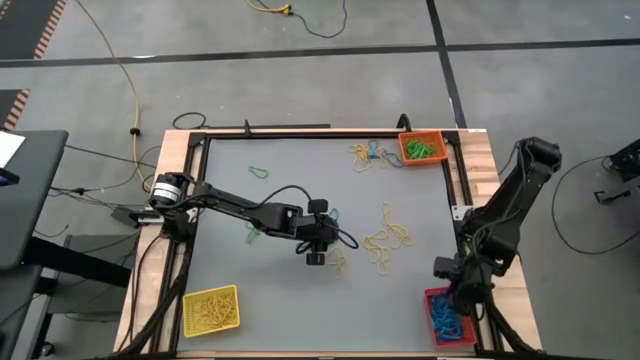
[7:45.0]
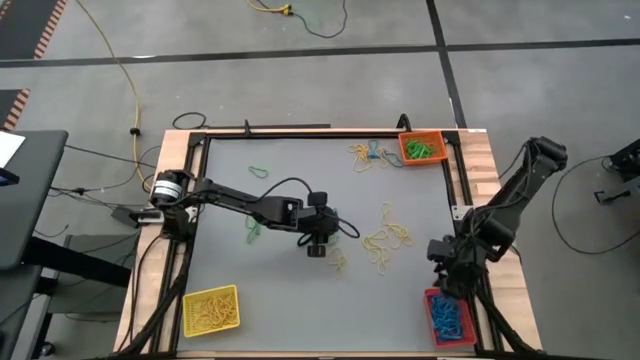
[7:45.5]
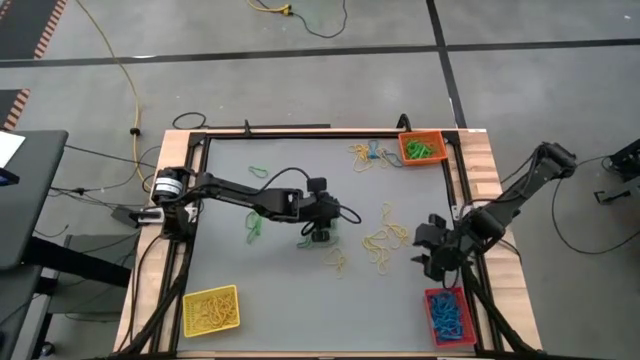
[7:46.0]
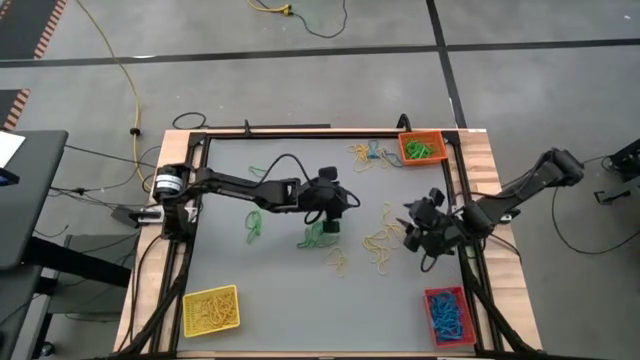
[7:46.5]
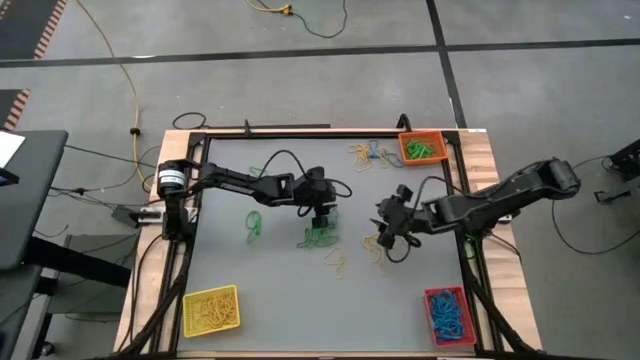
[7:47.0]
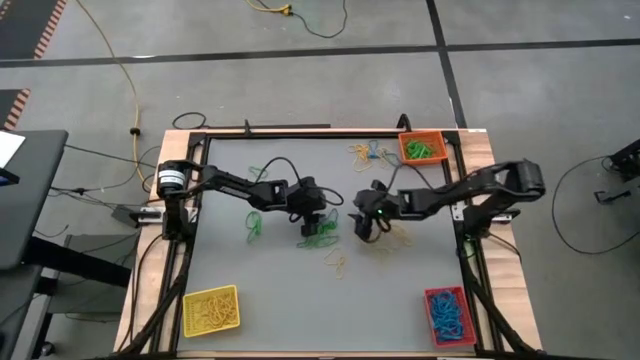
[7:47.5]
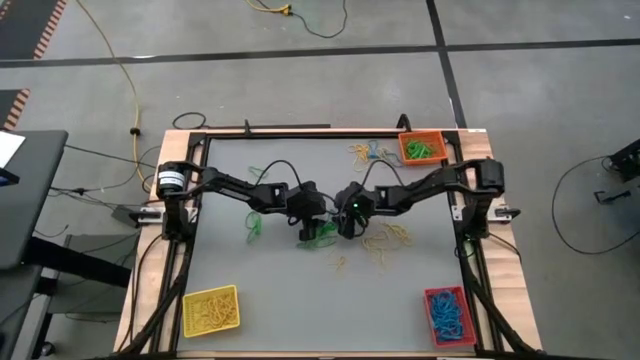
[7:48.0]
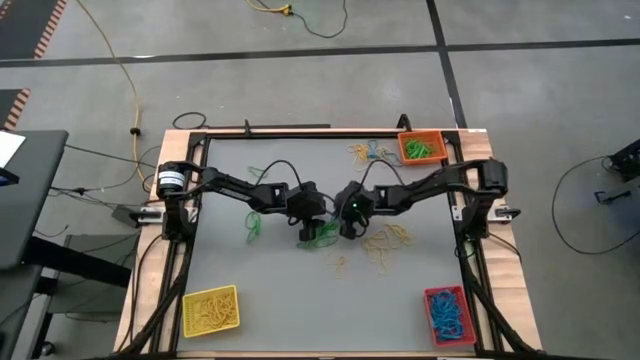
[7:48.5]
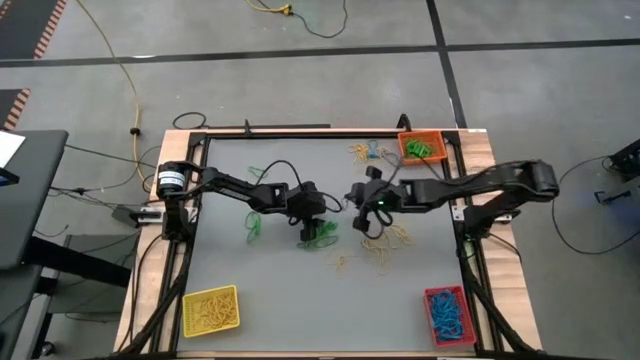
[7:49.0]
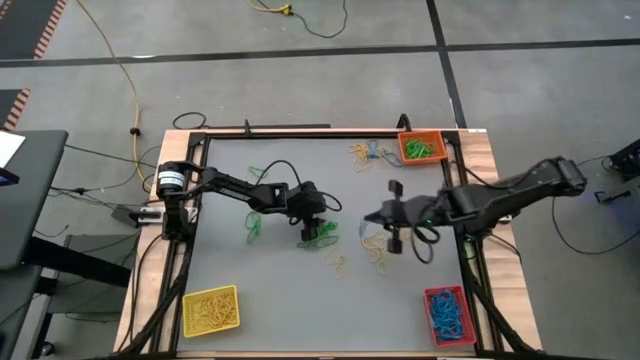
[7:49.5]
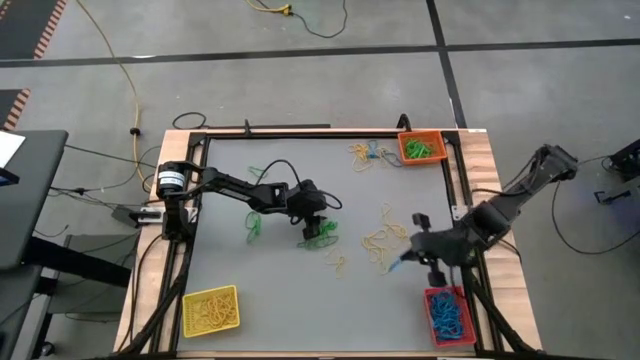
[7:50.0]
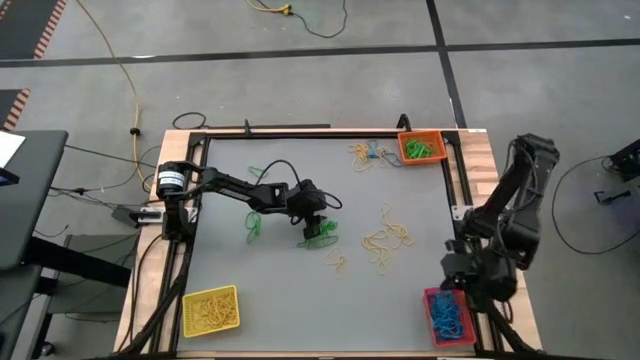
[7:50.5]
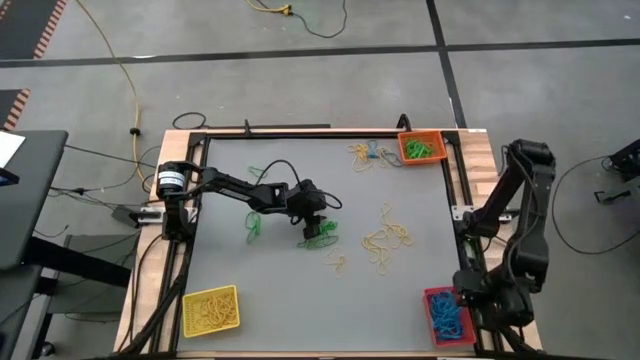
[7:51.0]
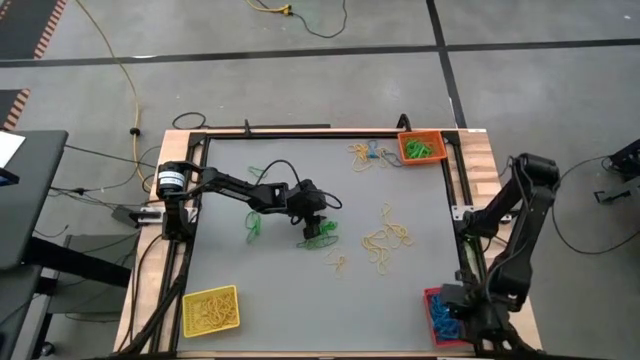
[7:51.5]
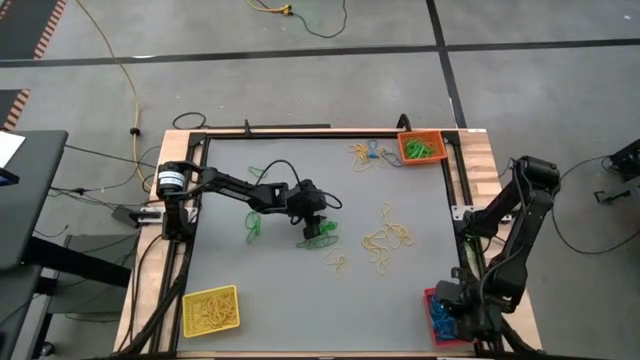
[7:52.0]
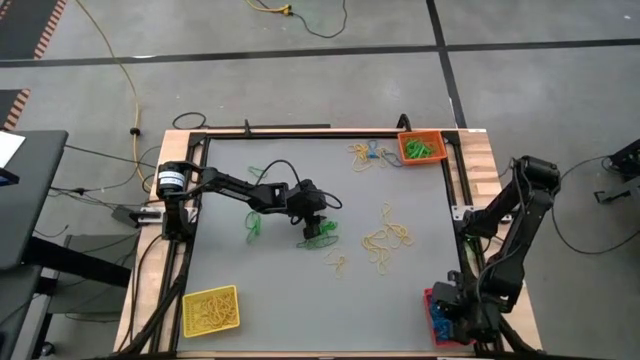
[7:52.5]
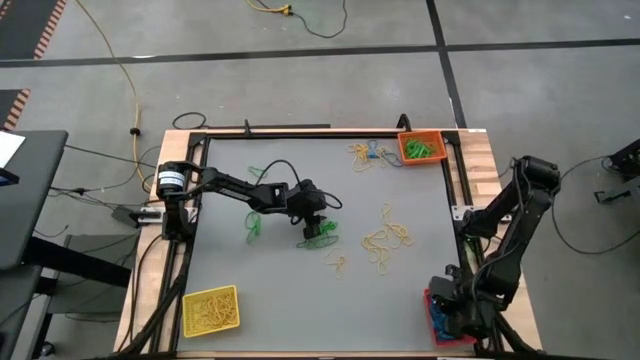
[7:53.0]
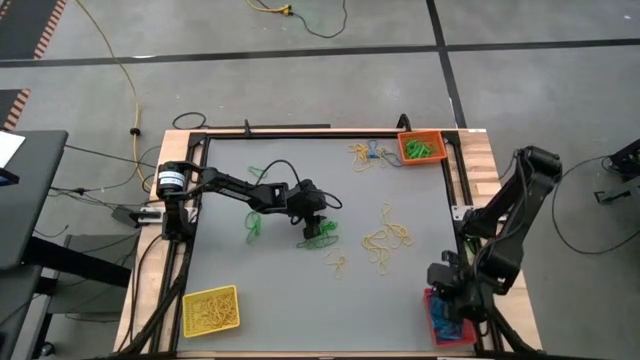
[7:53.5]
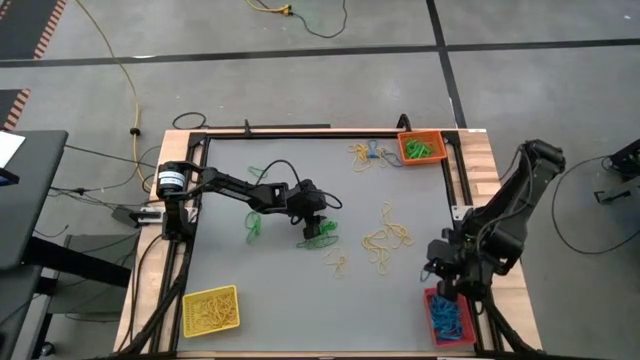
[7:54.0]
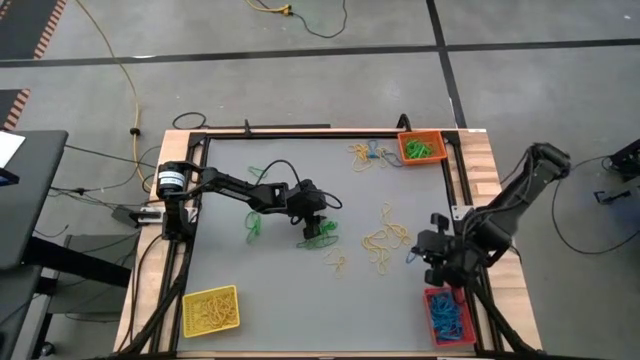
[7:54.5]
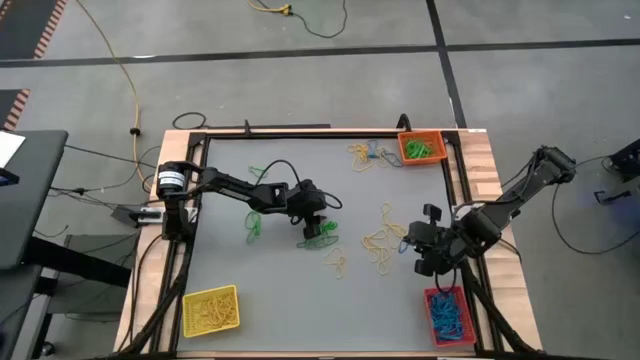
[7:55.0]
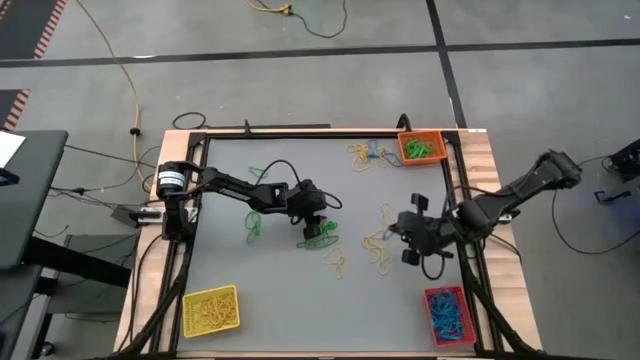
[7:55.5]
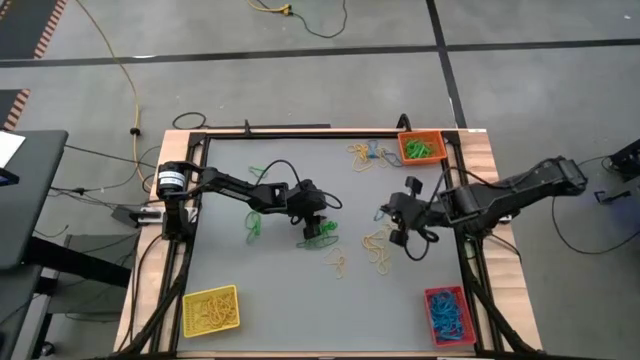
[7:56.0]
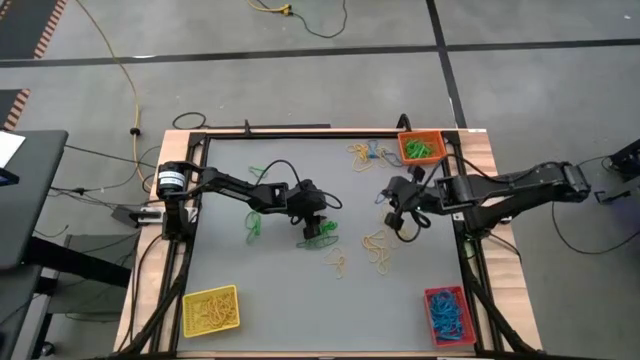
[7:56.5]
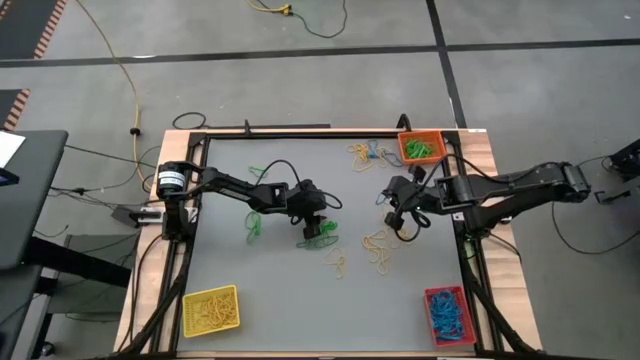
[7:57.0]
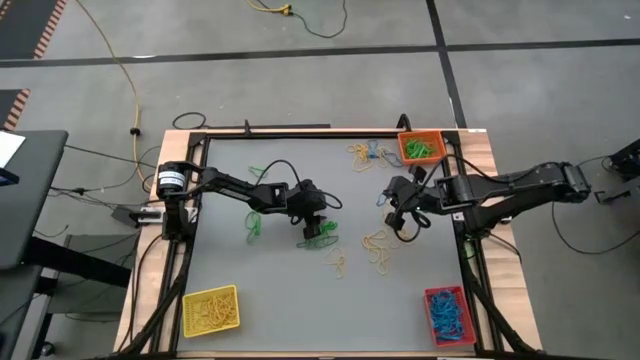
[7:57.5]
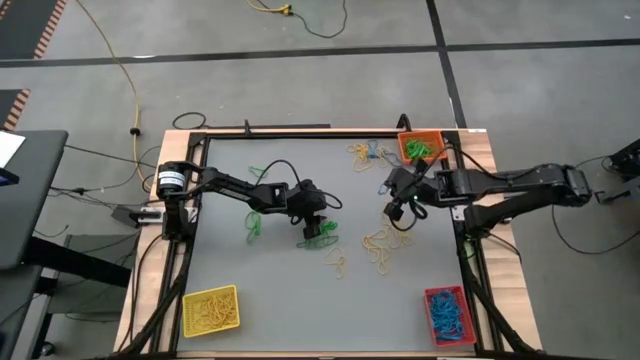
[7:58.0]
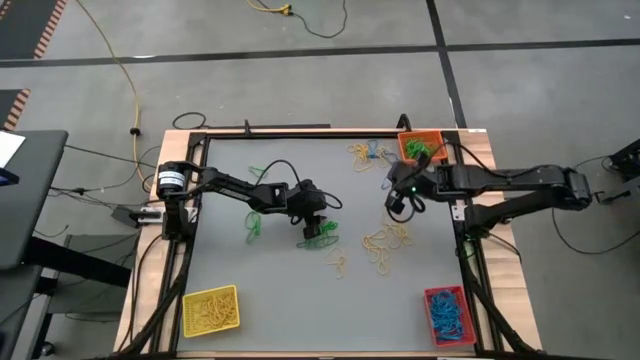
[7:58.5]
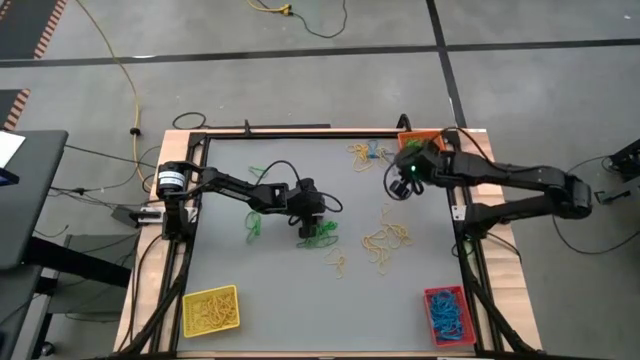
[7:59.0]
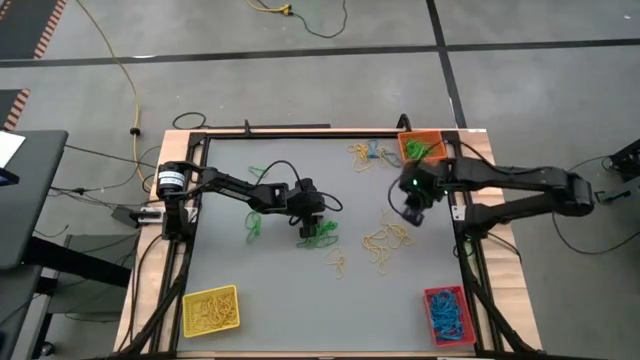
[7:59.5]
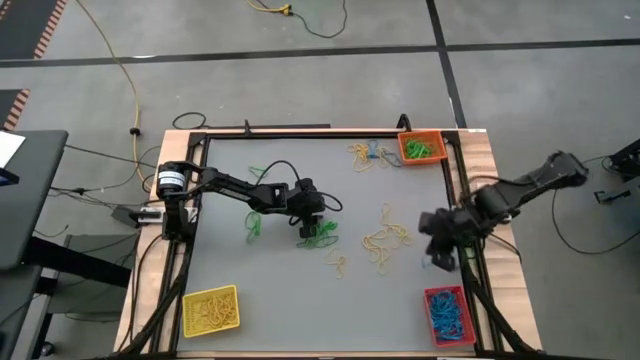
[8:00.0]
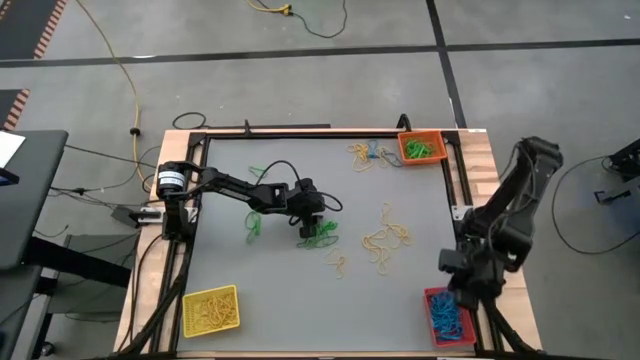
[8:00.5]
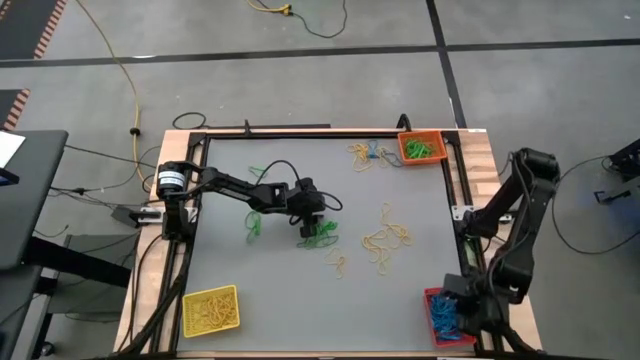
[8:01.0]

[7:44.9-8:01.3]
Task: Sort rubber bands into baskets
Put the blue rubber band into the red bin

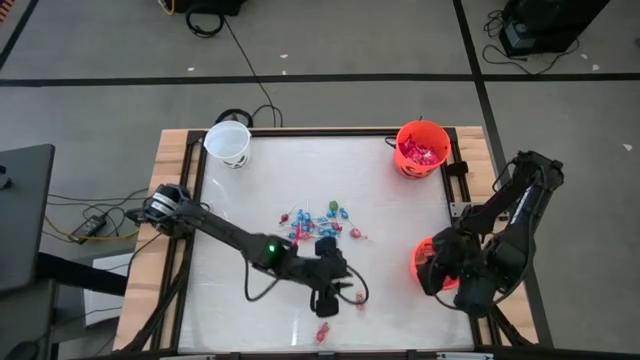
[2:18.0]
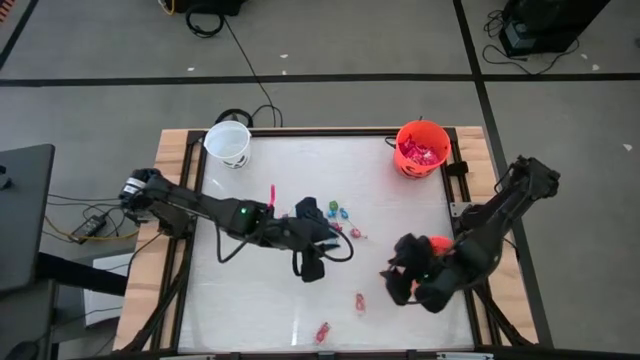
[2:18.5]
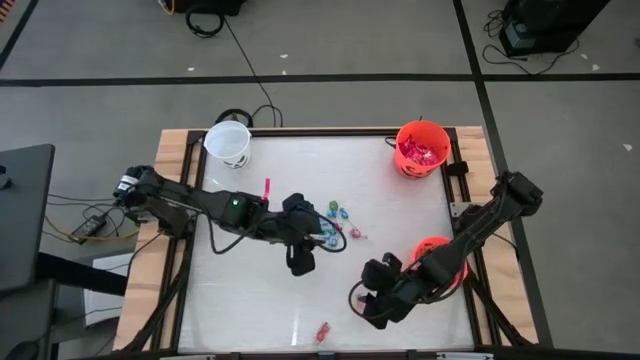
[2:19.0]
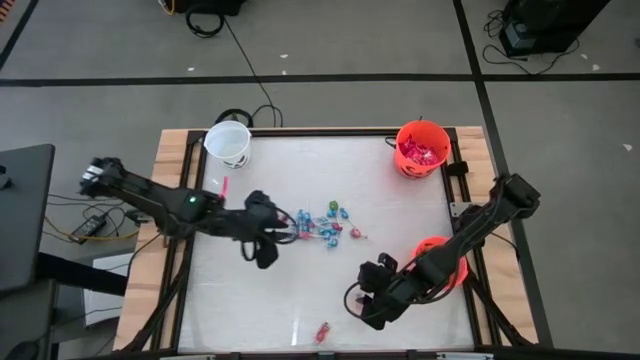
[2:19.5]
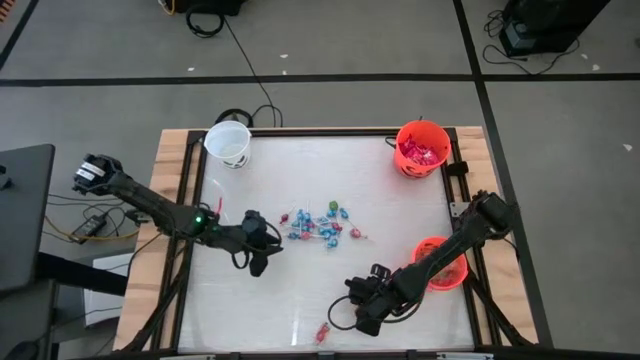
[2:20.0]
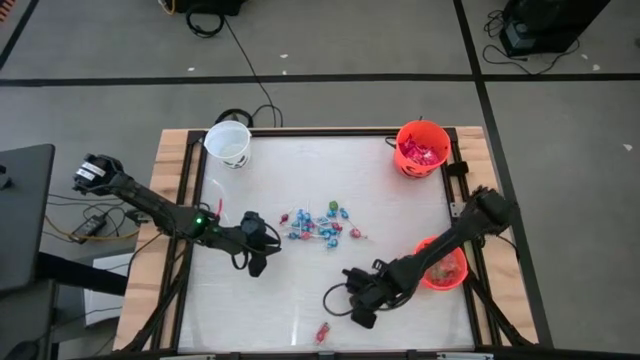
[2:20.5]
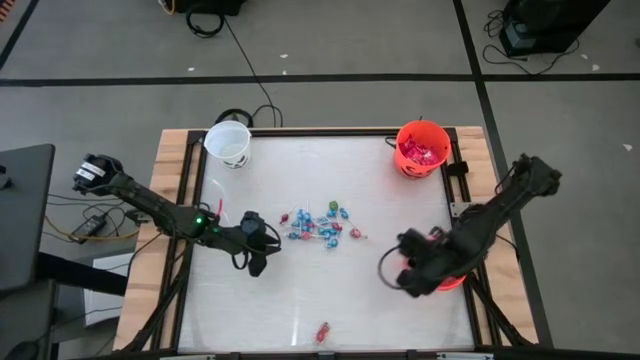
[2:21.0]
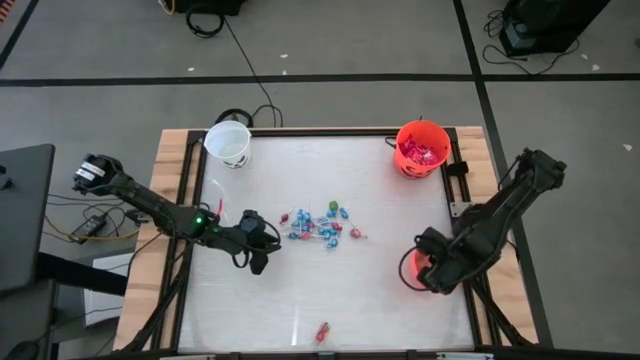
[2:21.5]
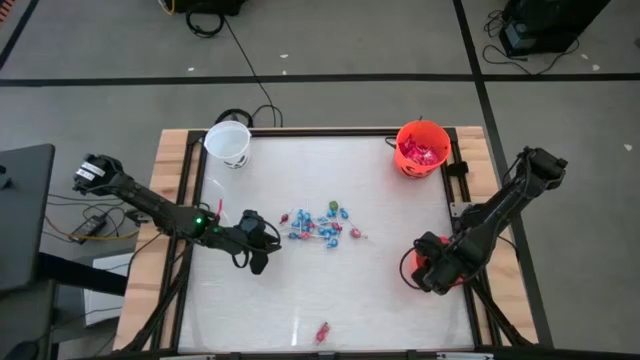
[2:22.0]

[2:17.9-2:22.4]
Task: Sort candy by brand, put in halloween buckets
Put the orange gummy into the bottom orange bucket
